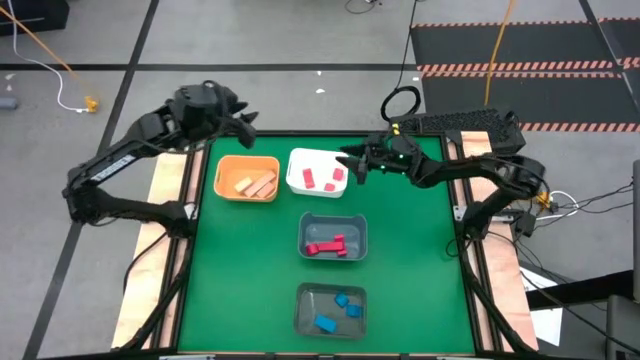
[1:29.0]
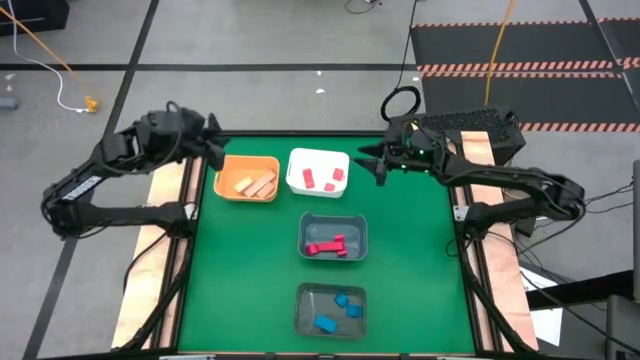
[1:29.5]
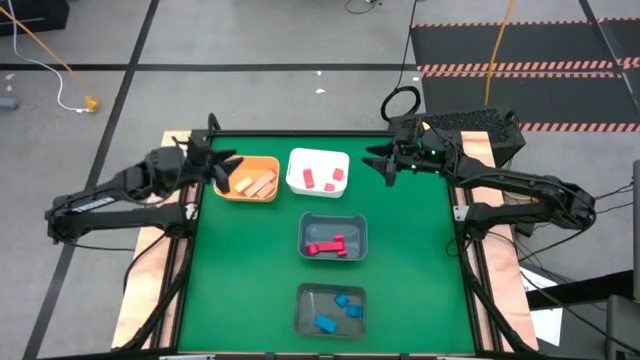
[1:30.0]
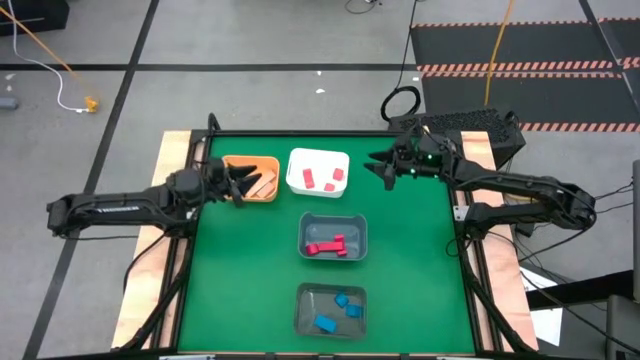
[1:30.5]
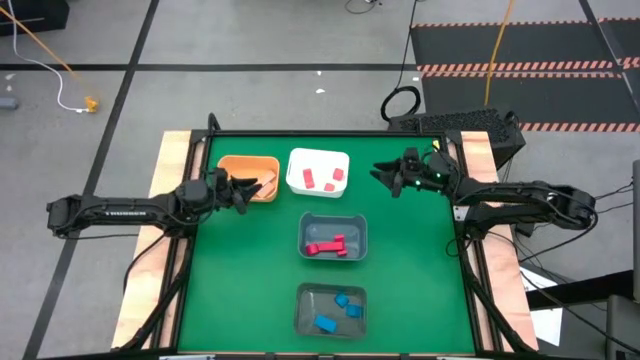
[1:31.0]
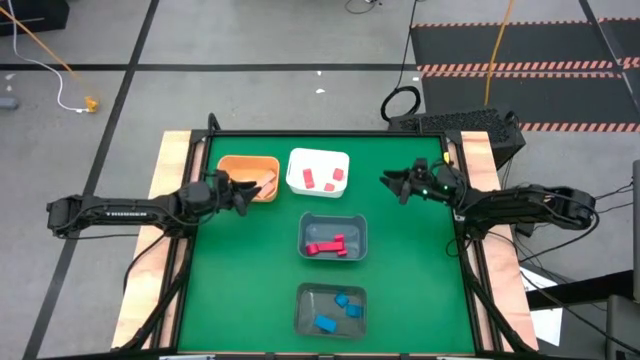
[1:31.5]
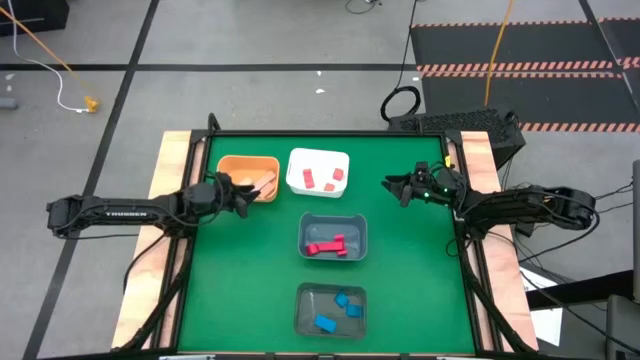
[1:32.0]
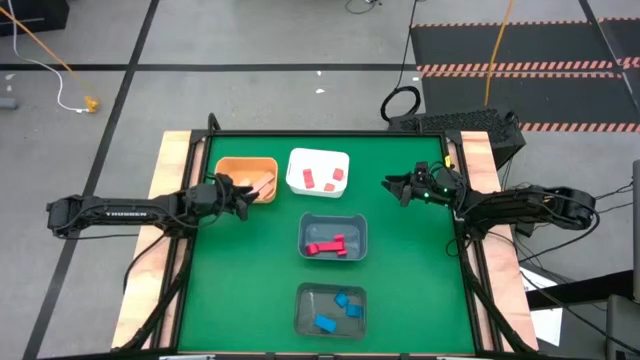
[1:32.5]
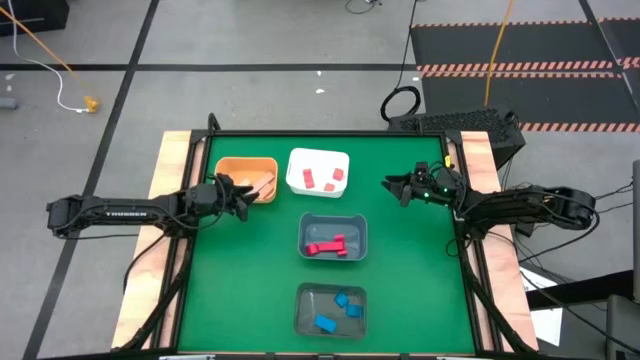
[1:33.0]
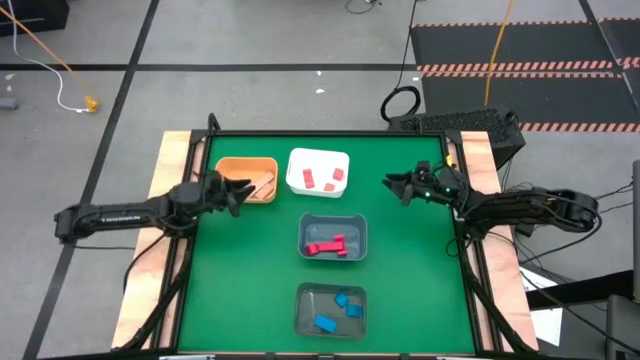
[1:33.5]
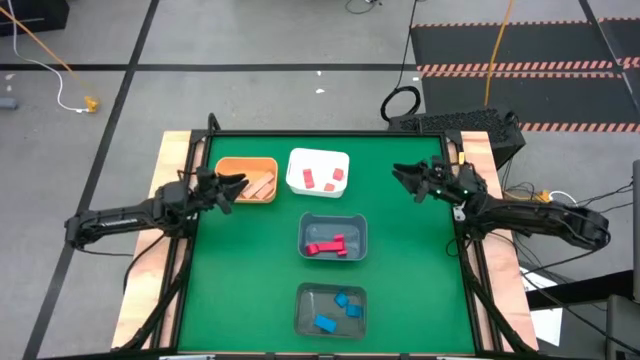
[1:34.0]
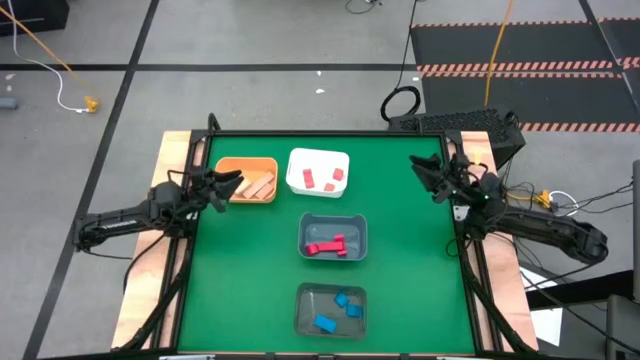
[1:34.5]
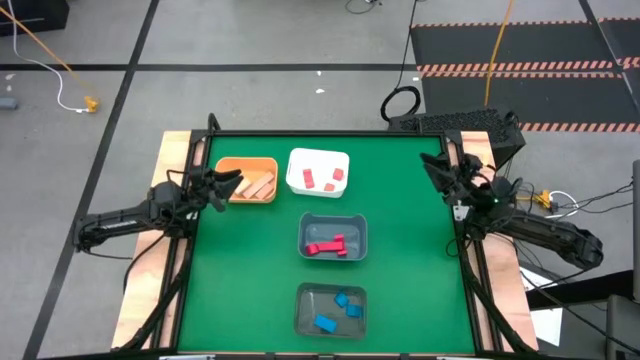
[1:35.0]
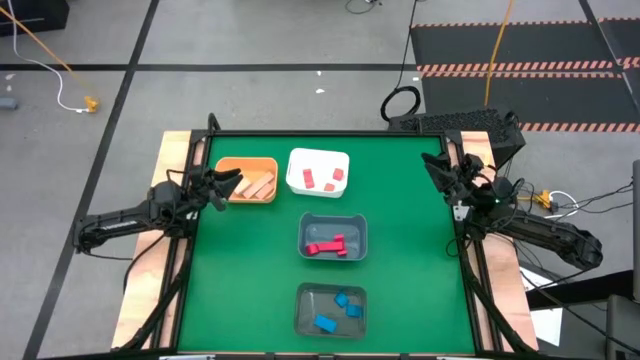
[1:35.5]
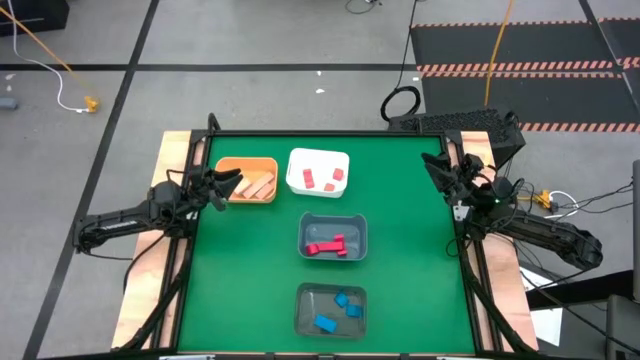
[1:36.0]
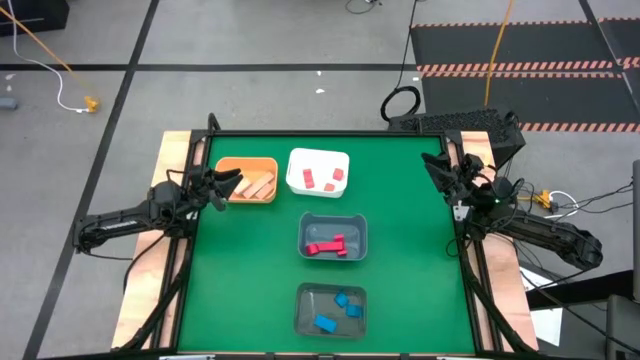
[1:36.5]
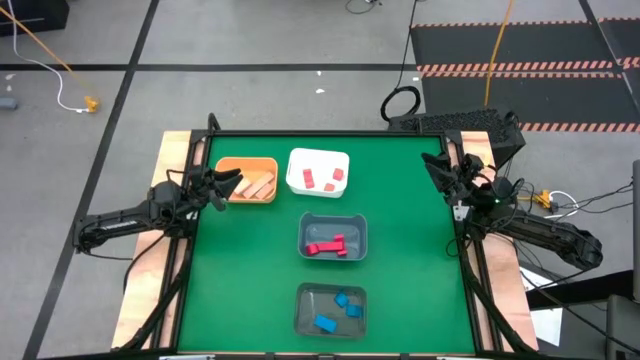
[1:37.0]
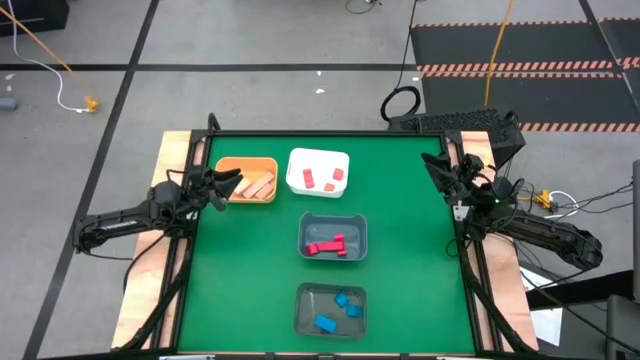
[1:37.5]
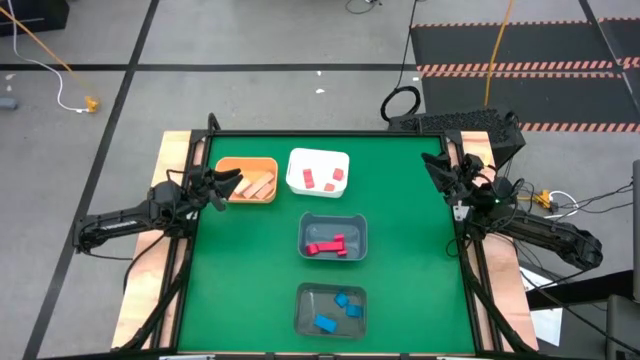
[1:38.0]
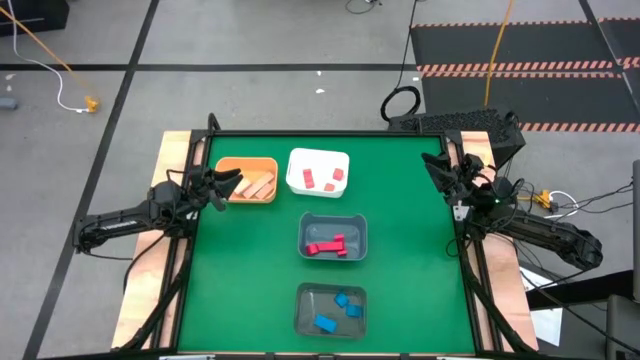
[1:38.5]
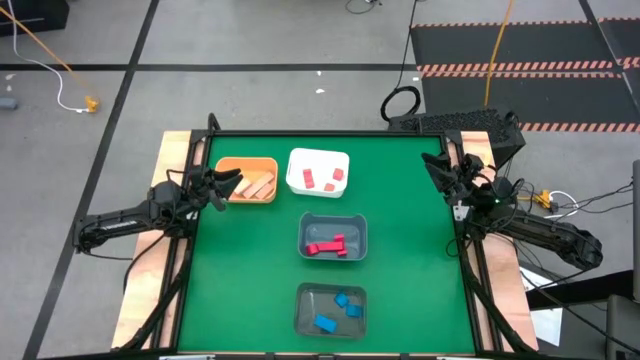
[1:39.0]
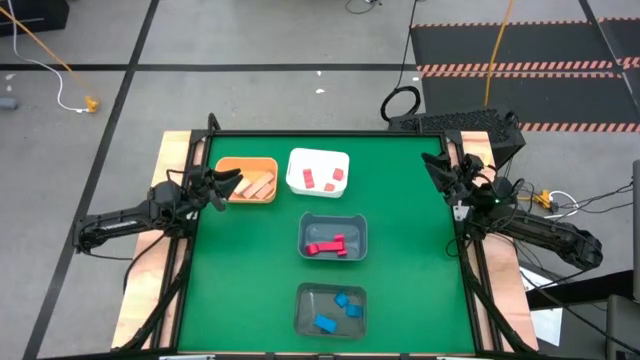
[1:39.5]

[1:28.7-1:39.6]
Task: Sort & place blocks by color
Return to Home Position

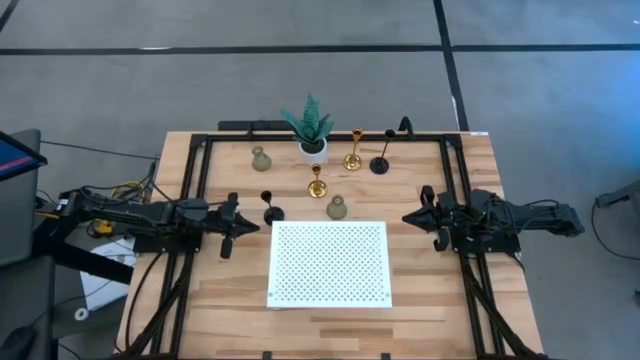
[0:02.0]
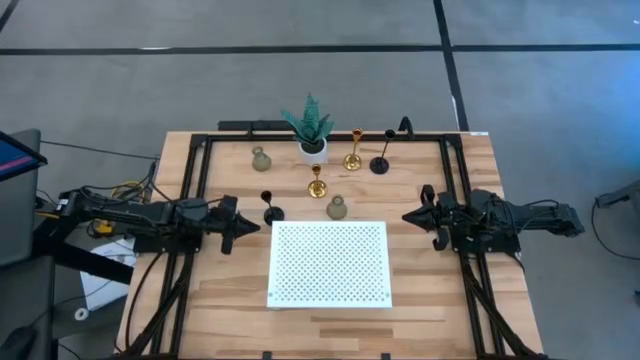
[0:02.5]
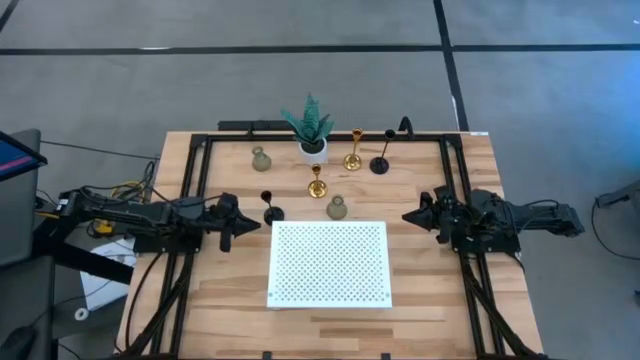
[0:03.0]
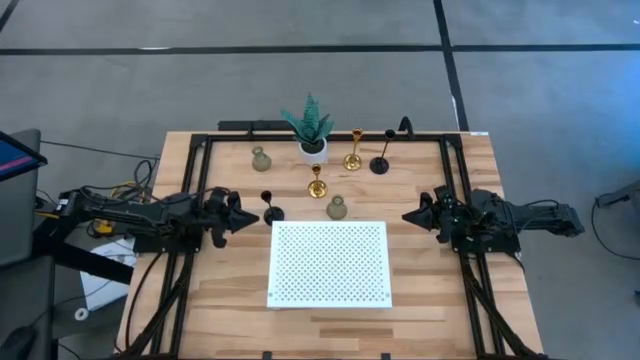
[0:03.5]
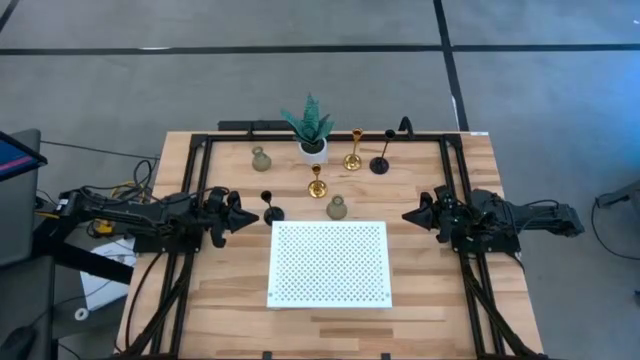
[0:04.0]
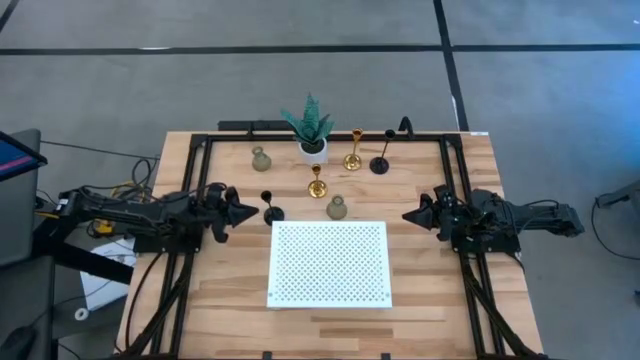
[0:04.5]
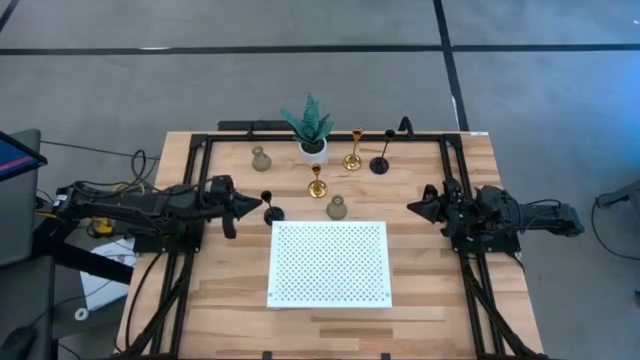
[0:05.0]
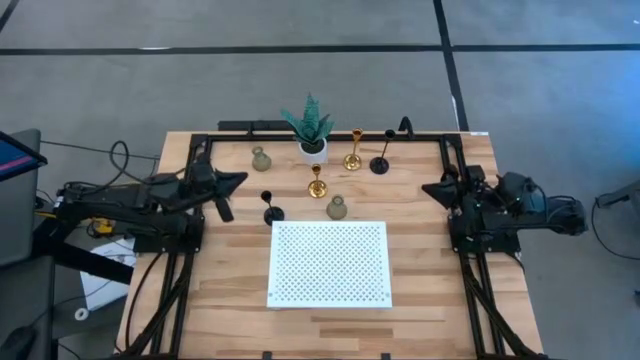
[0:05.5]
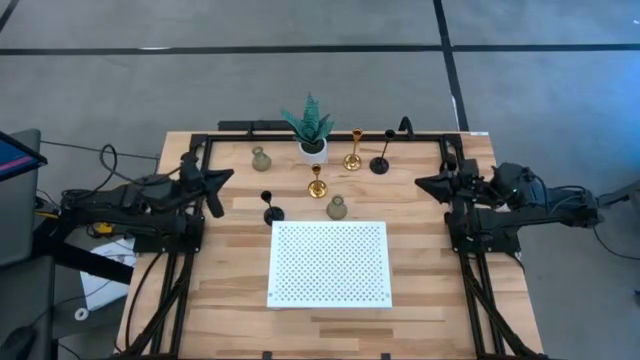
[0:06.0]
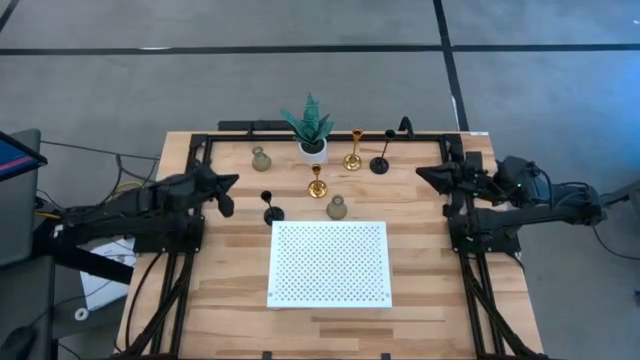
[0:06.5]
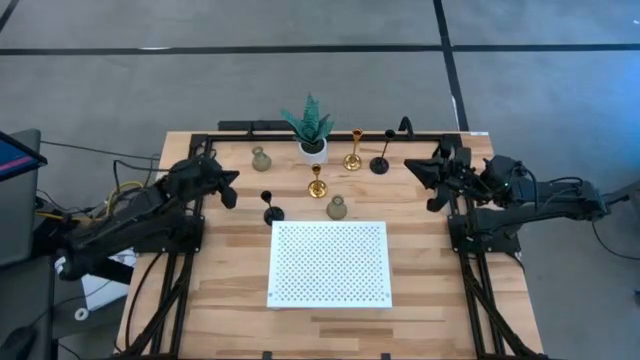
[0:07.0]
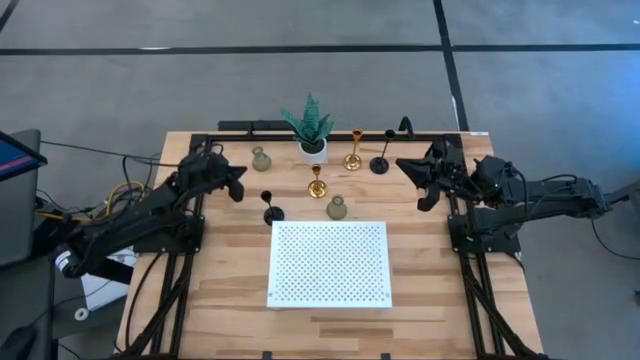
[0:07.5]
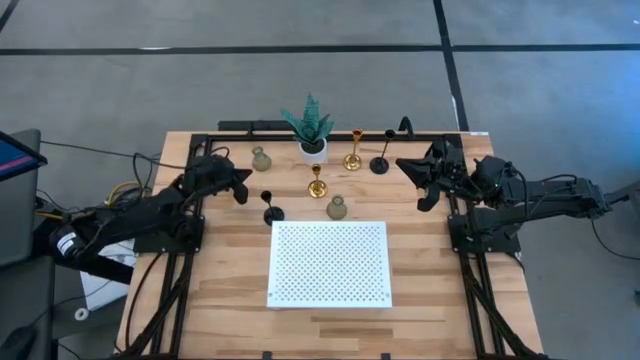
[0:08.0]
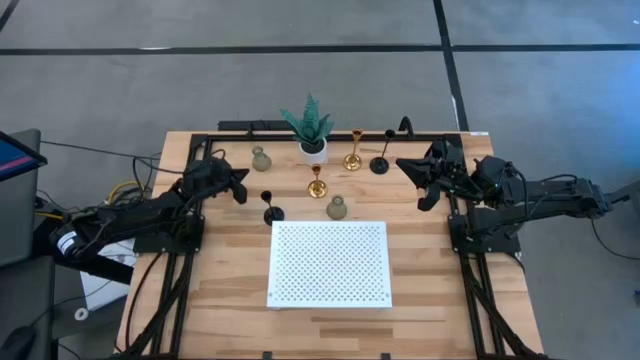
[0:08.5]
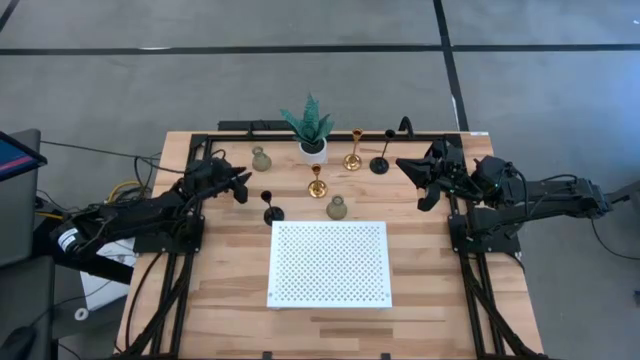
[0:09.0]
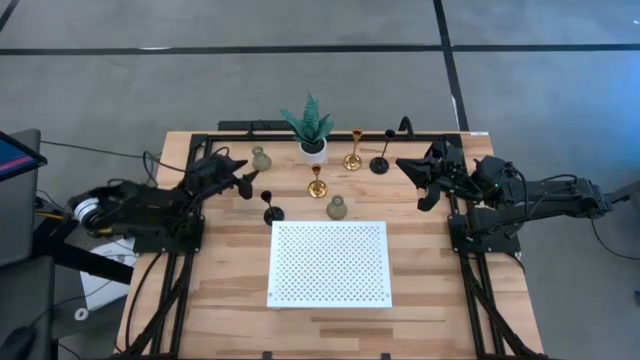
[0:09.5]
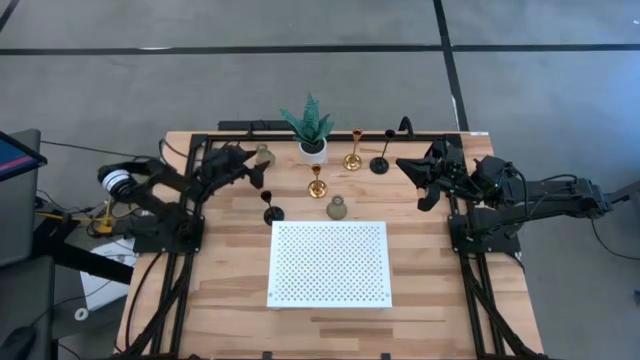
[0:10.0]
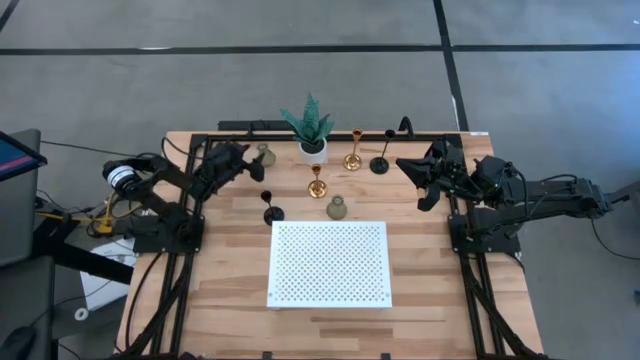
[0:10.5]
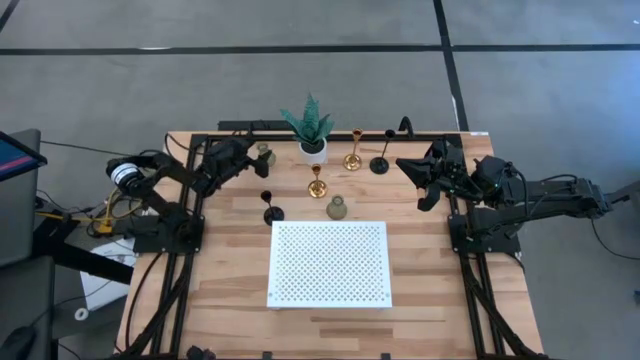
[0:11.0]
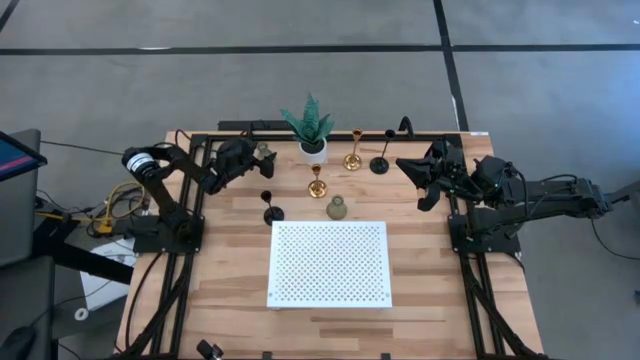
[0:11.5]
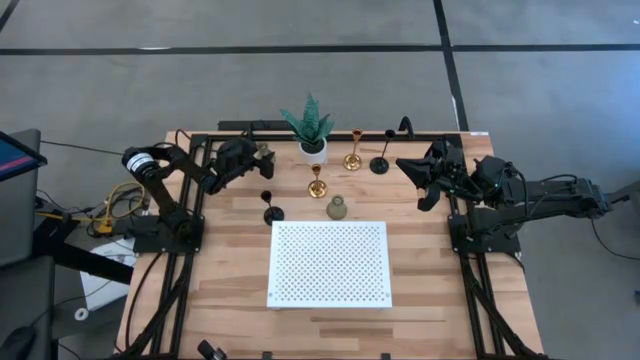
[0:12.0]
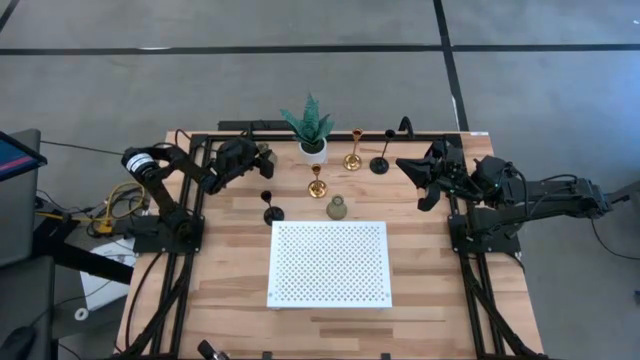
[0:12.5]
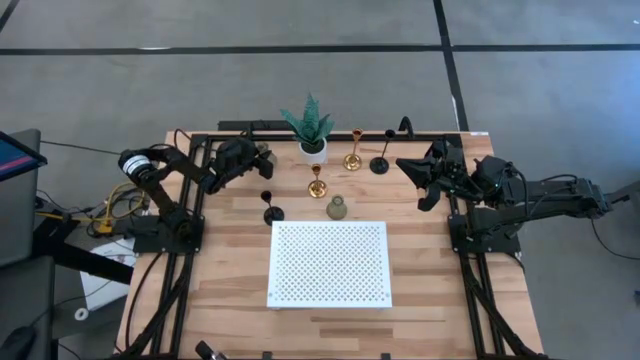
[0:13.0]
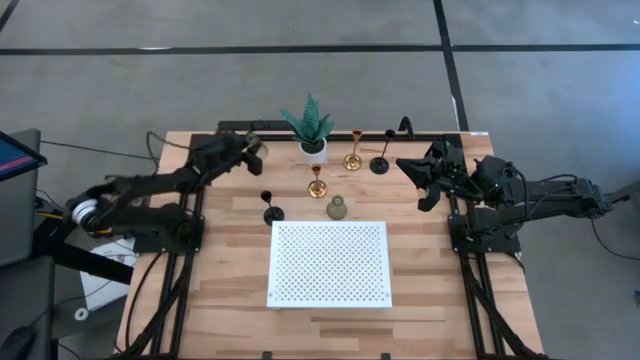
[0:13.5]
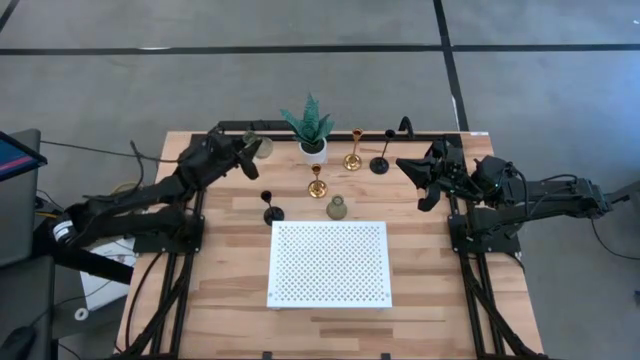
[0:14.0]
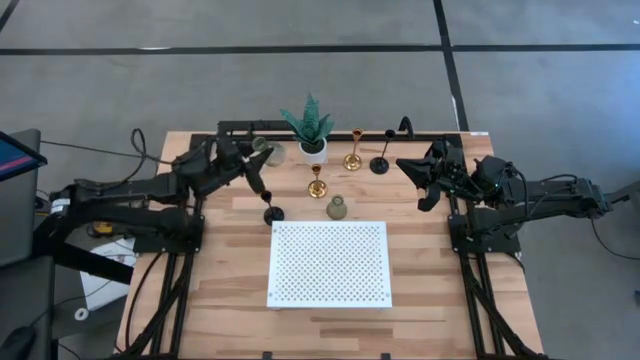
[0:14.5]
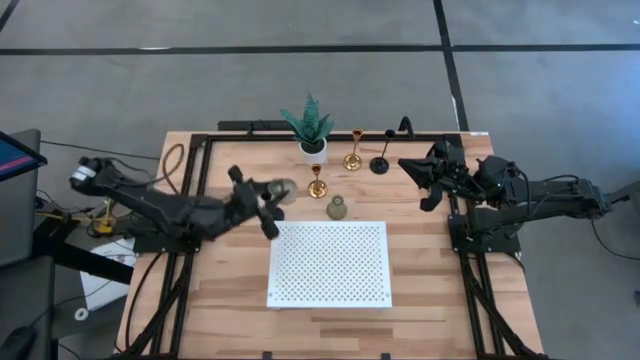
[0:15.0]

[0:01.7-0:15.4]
Task: Pick & Place candle stick holders
Put the top transparent glass candle holder on the shelf
